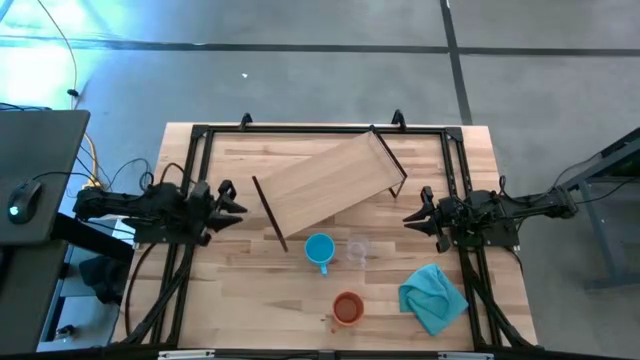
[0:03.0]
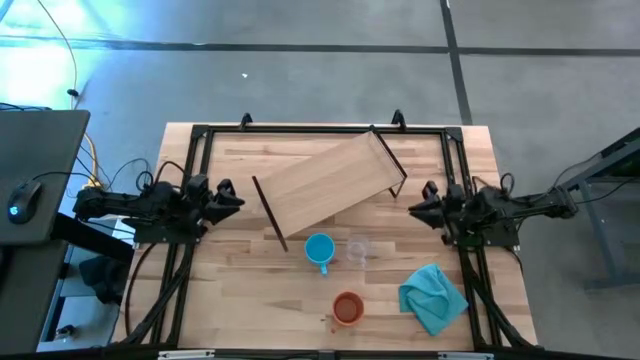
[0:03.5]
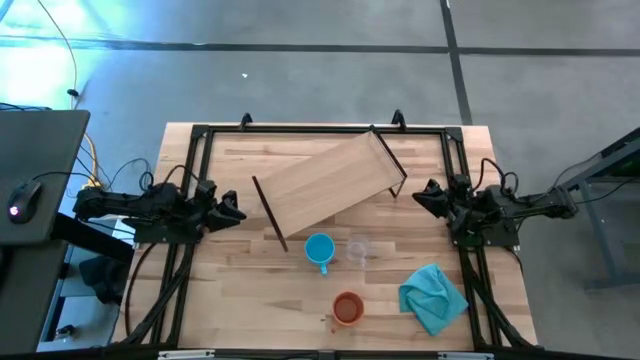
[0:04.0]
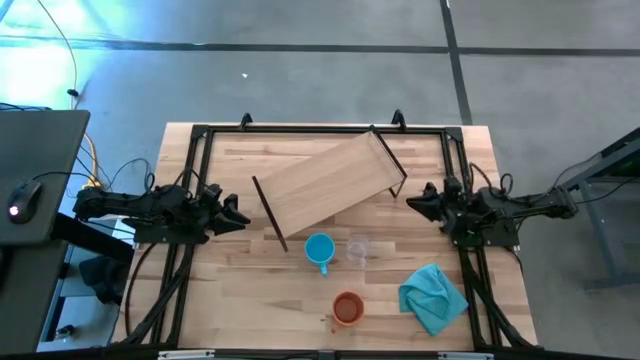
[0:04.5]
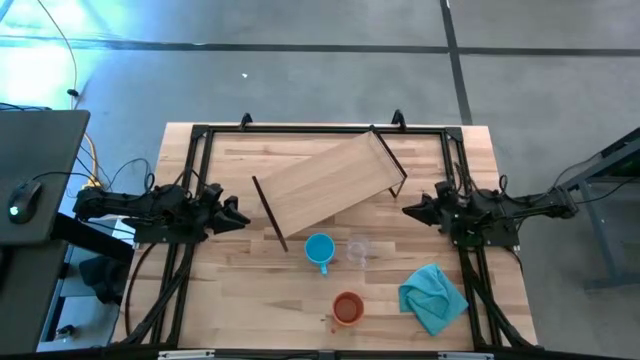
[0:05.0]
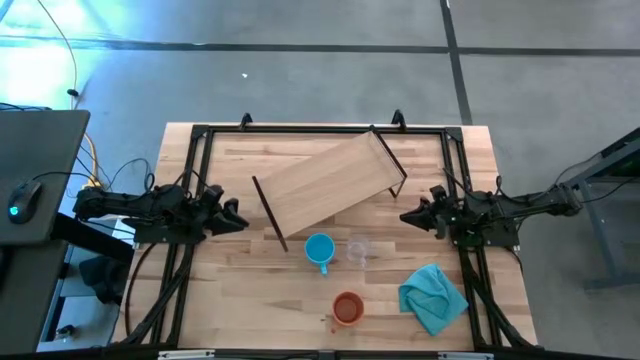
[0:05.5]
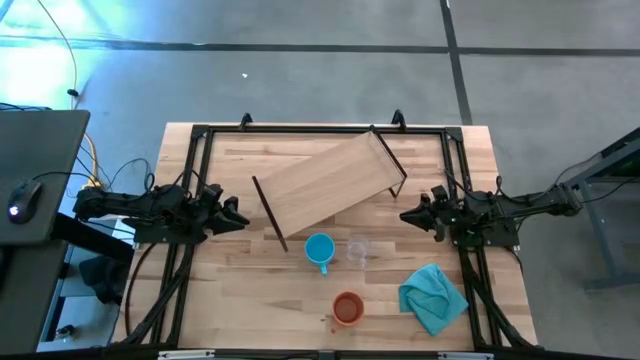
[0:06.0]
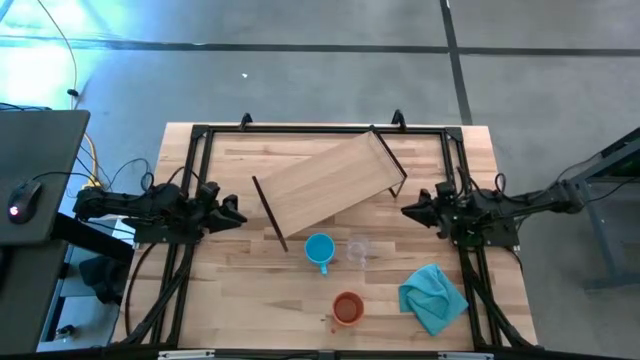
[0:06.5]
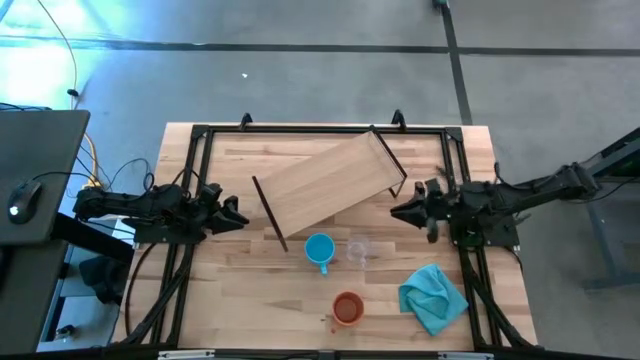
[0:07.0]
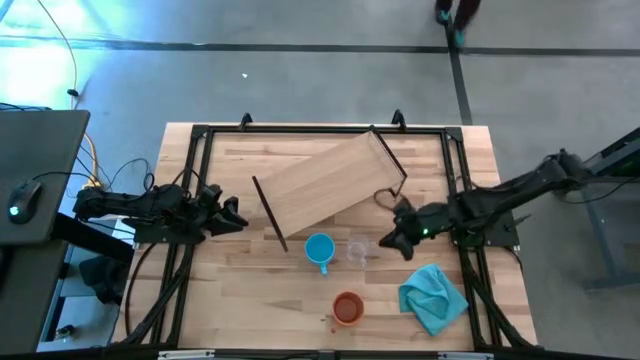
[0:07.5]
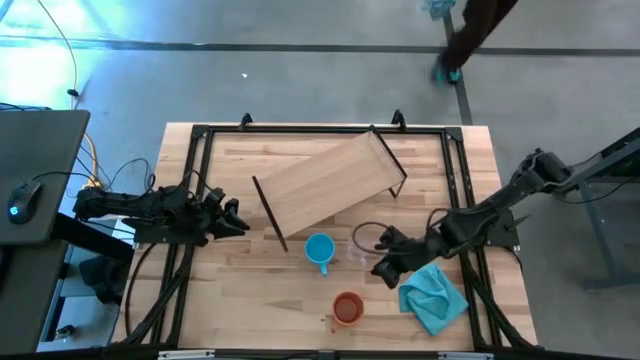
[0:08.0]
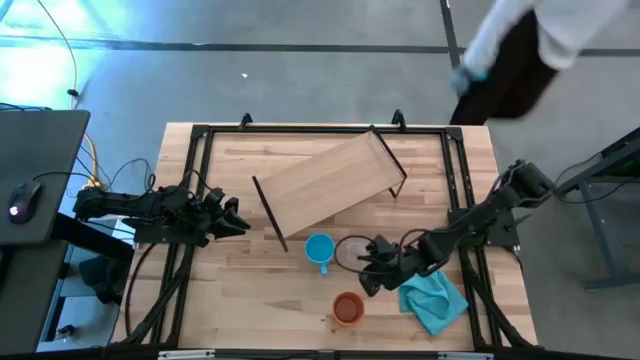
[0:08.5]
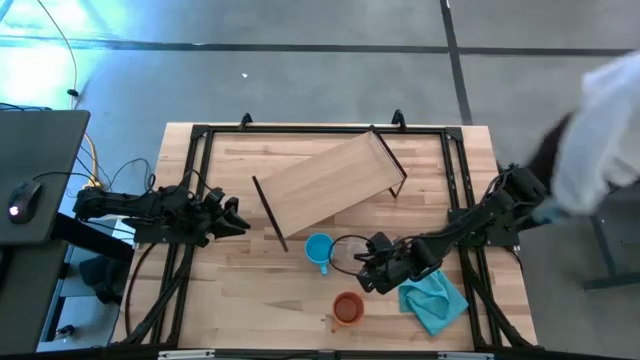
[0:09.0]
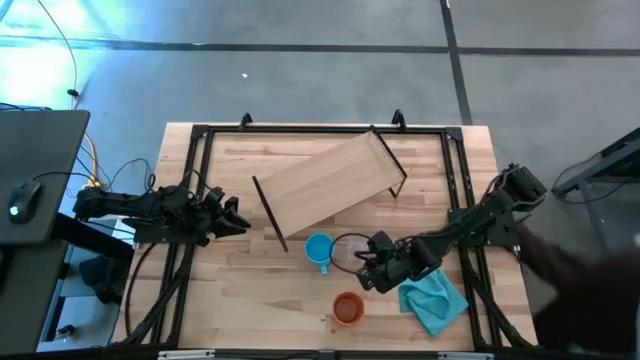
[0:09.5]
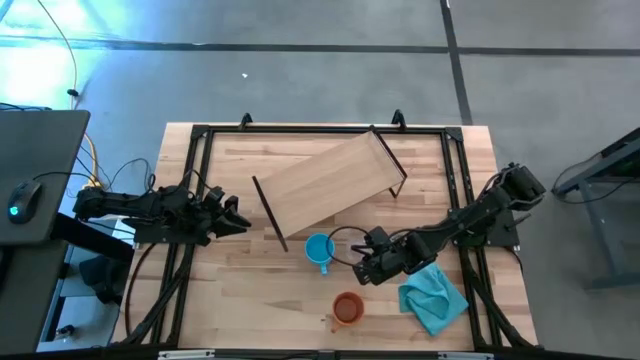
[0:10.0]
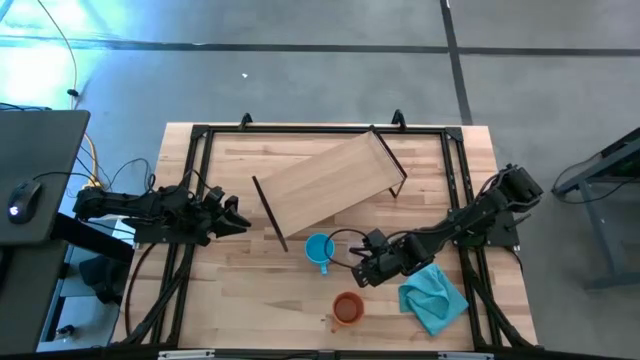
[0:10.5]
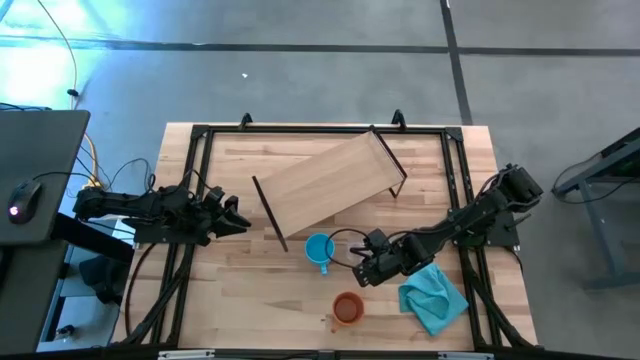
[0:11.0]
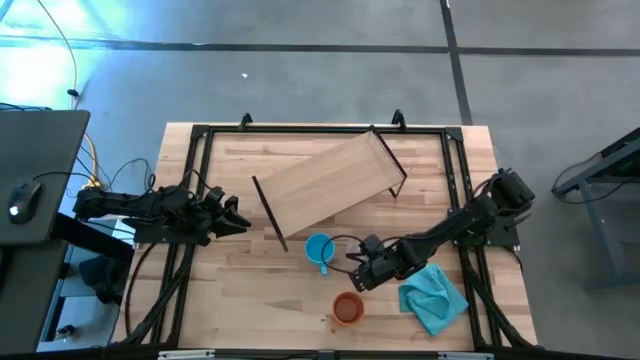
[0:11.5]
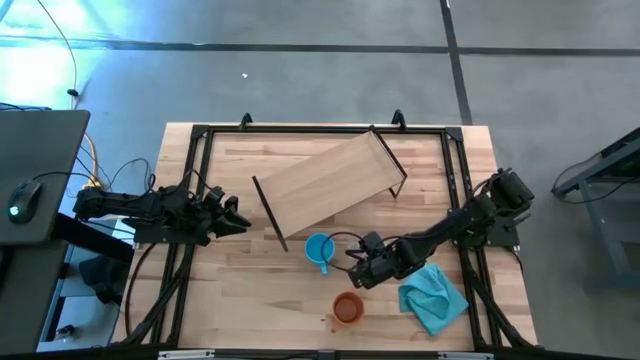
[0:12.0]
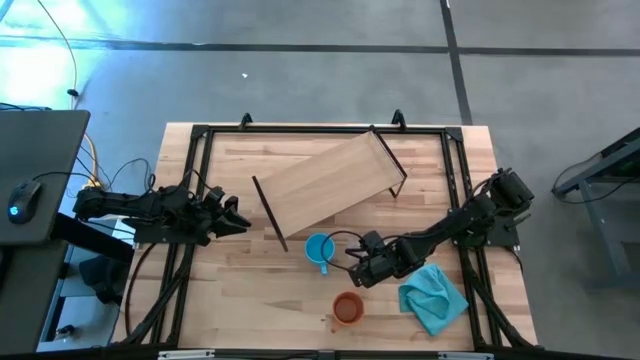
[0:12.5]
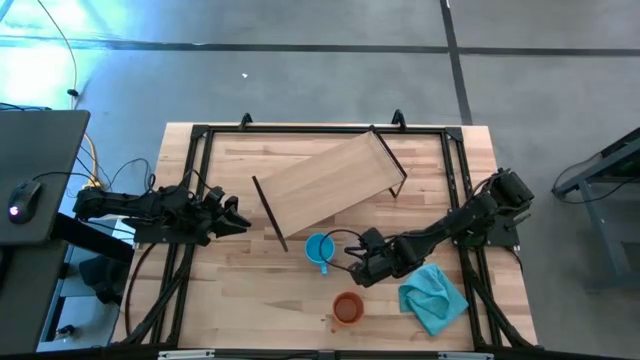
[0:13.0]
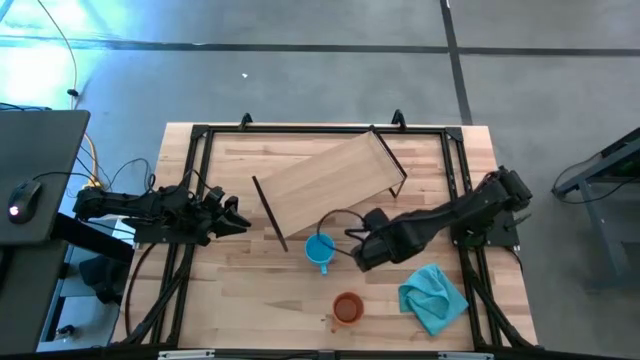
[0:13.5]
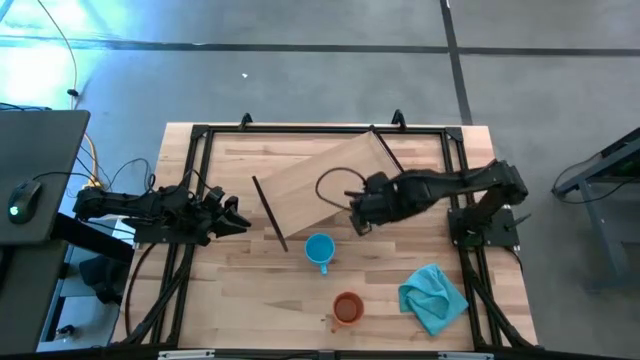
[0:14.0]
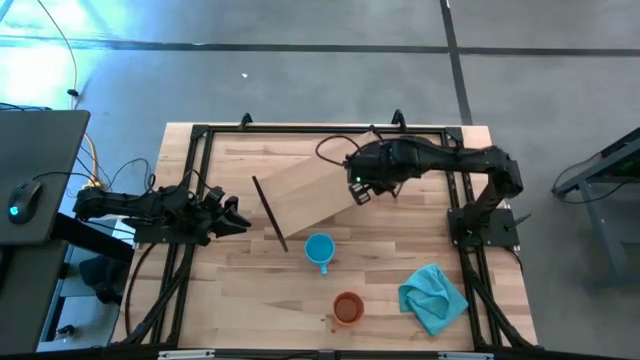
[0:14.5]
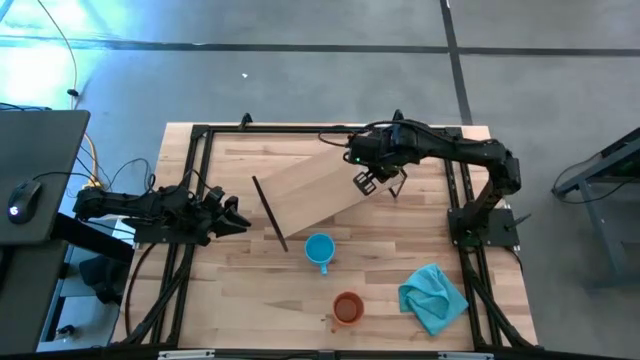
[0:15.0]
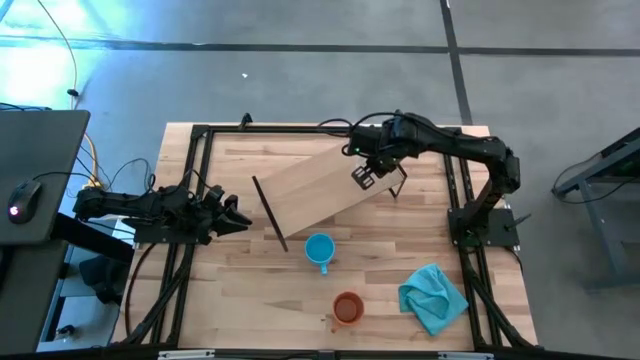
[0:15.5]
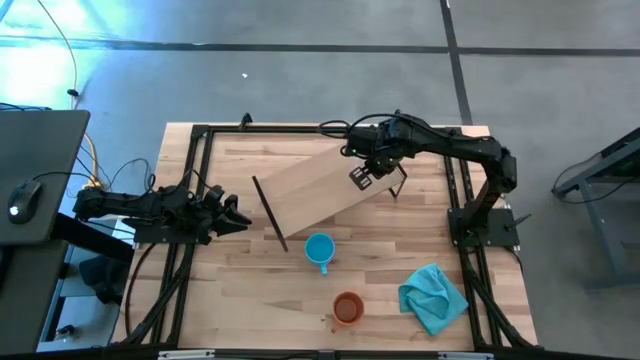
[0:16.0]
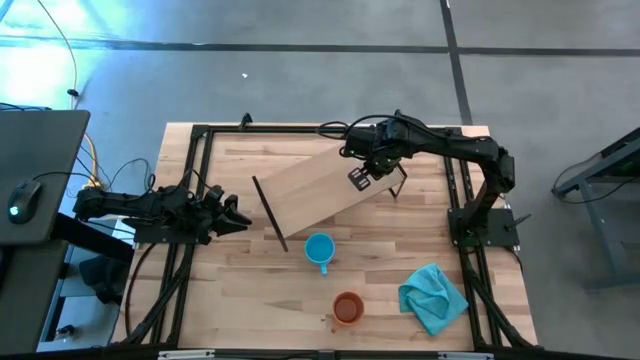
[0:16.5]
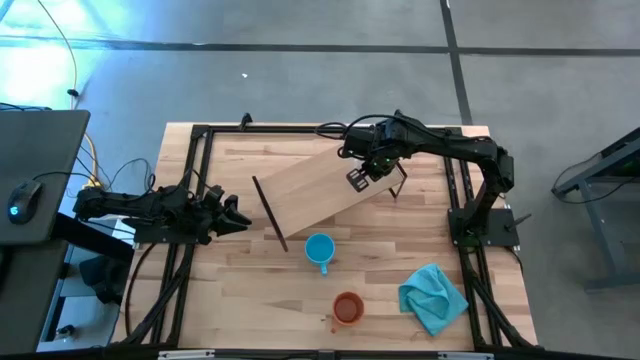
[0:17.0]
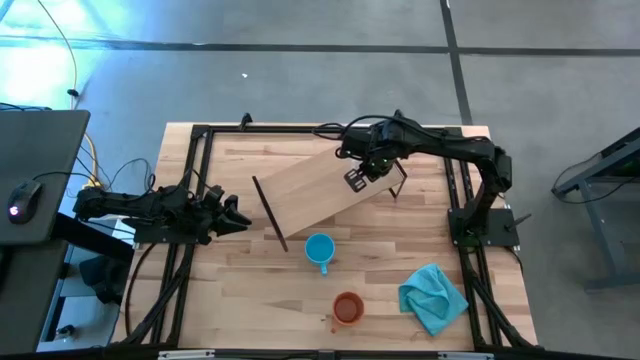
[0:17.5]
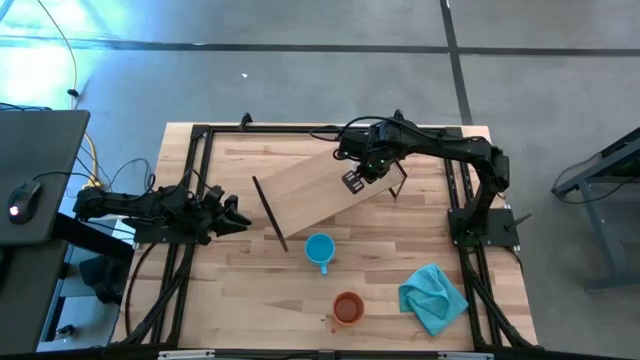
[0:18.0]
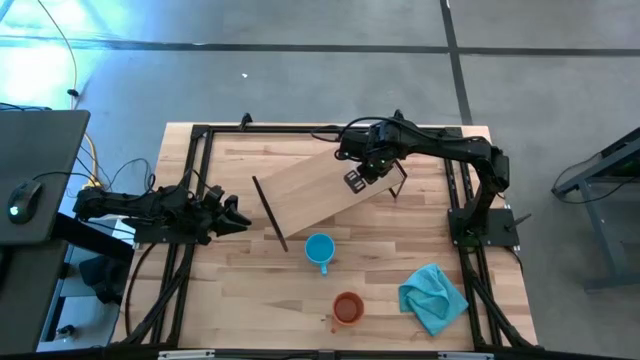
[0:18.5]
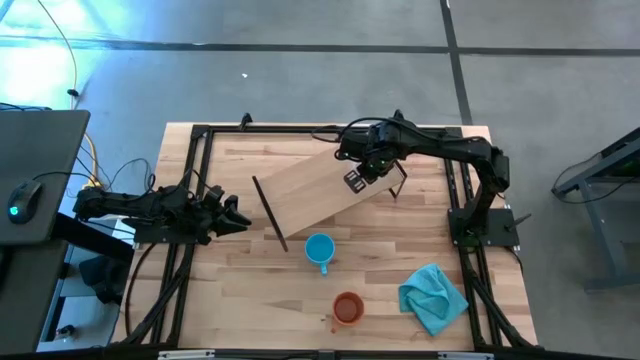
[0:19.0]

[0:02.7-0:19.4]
Task: Stack small to large cups/mugs on shelf
Put the transparent mug on the shelf

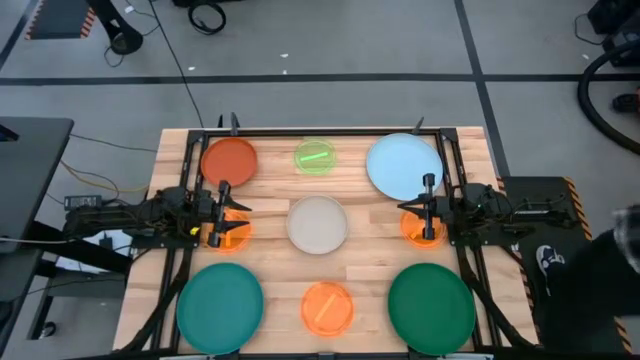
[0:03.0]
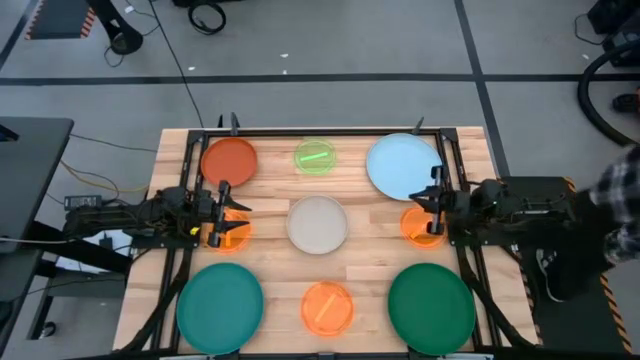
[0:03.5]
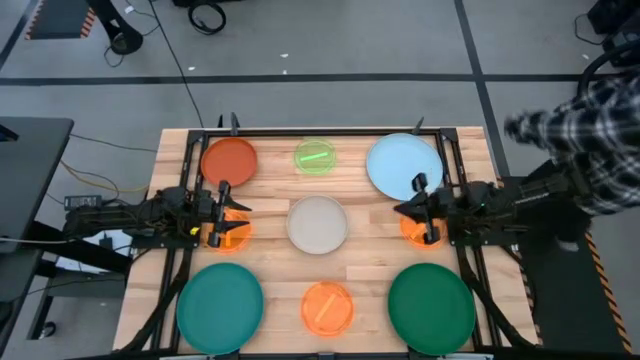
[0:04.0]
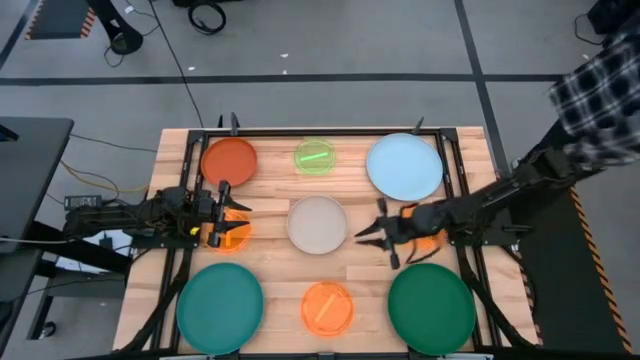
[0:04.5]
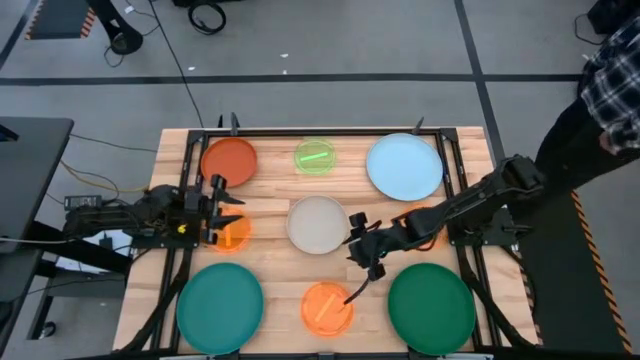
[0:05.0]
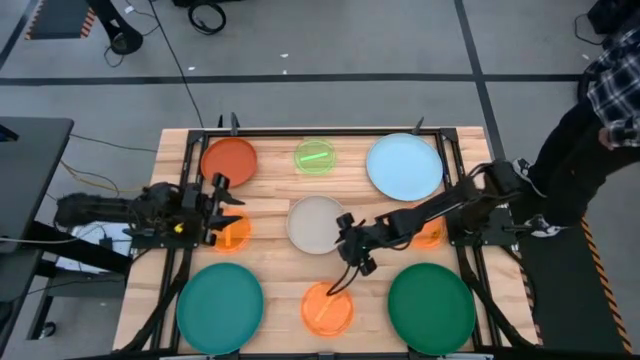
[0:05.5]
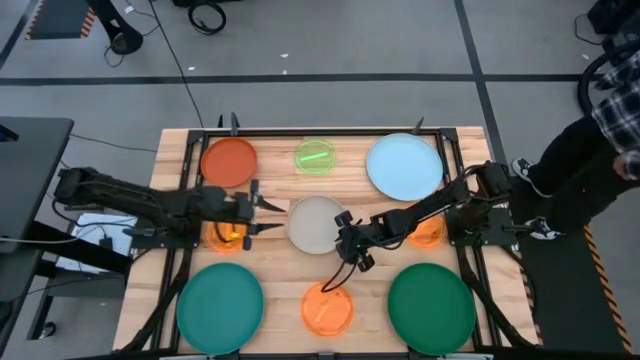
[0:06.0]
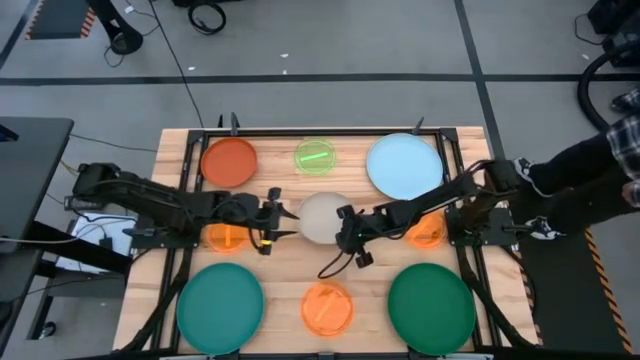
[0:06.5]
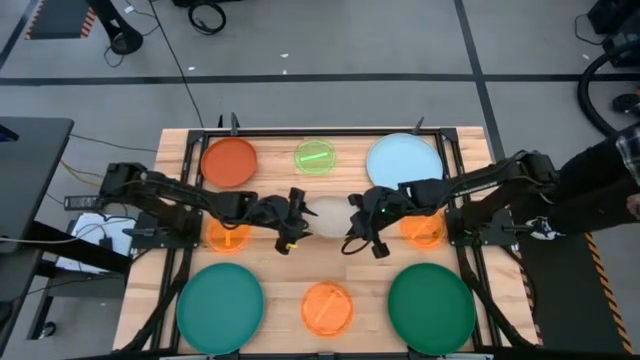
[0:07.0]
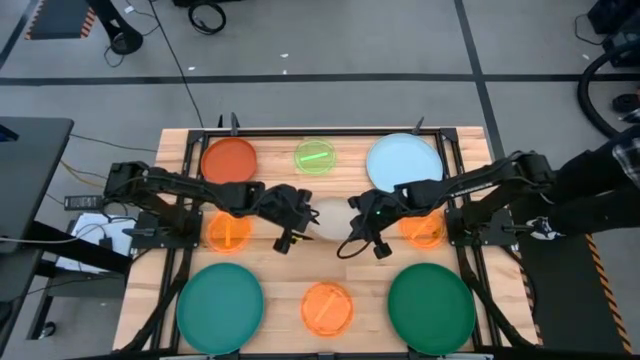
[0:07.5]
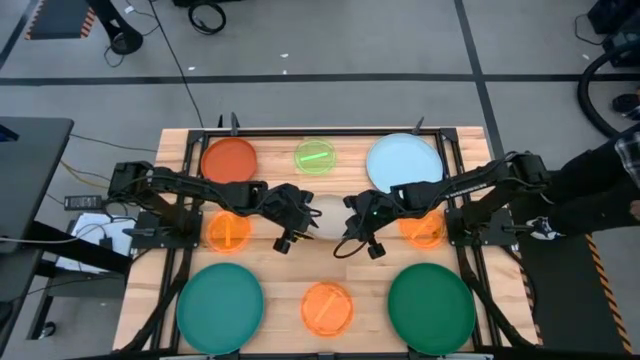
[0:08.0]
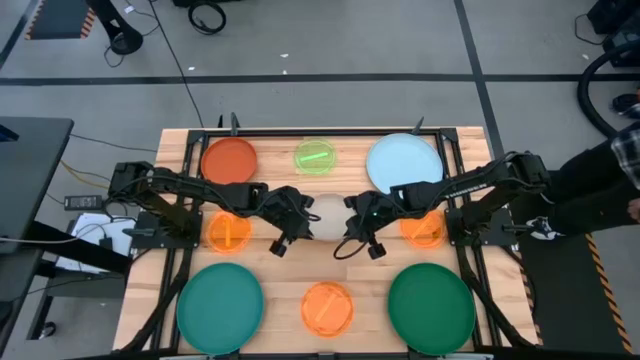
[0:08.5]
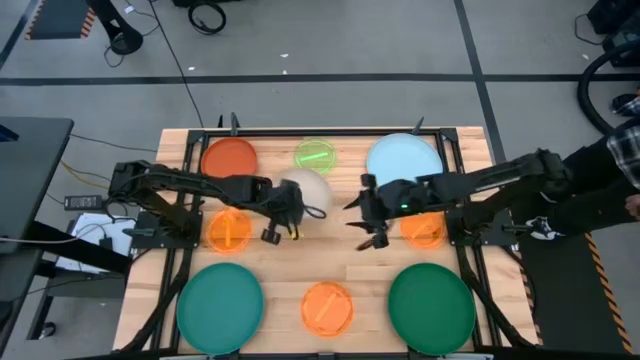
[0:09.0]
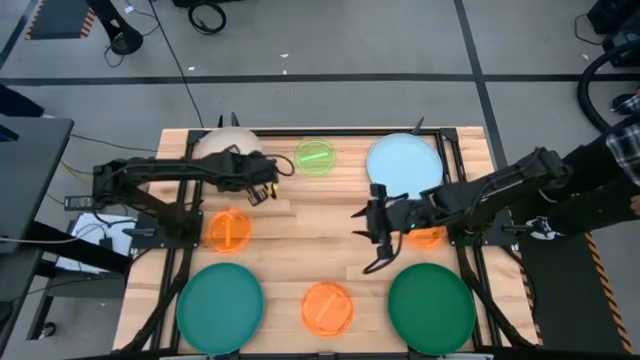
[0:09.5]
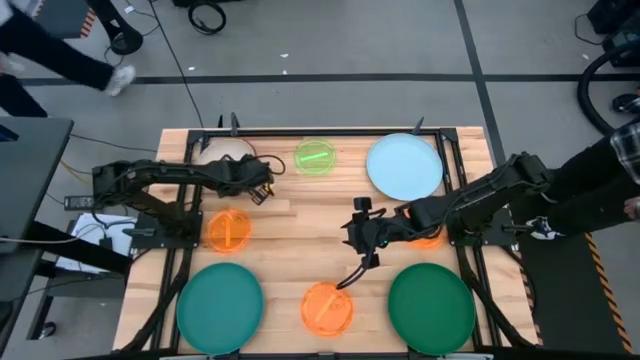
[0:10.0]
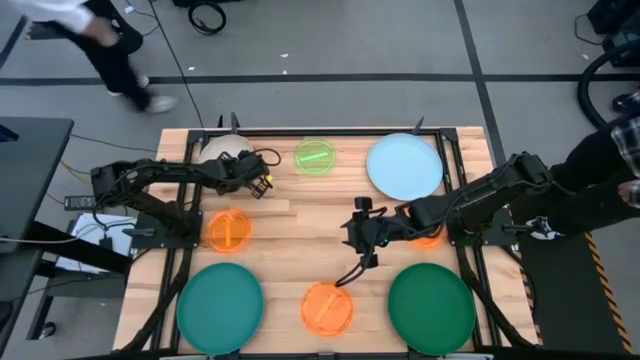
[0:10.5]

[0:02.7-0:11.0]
Task: Stack plastic plates
Stack the gray plate on top of the orange plate
